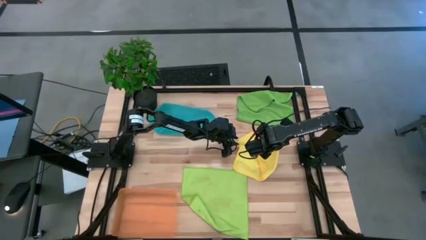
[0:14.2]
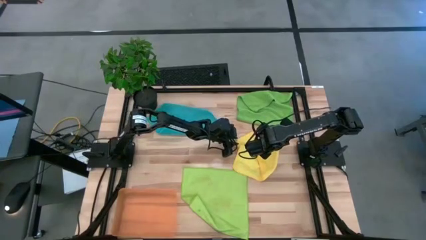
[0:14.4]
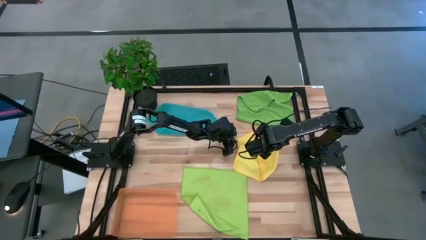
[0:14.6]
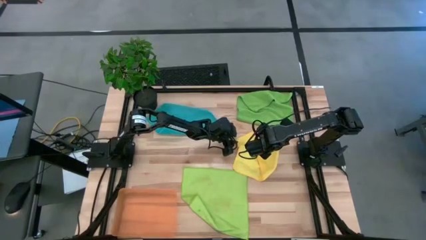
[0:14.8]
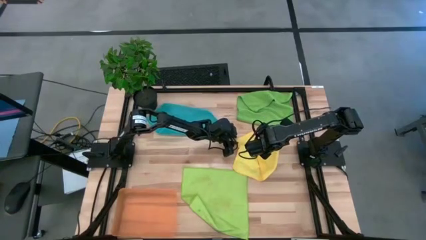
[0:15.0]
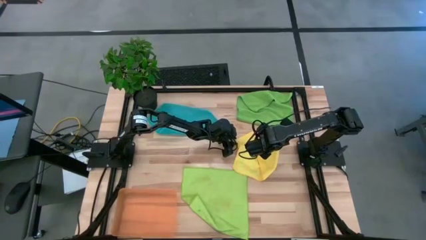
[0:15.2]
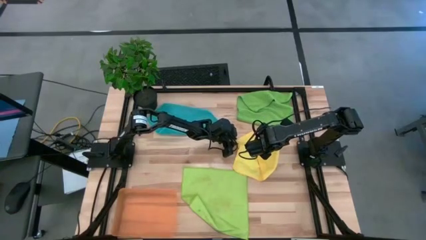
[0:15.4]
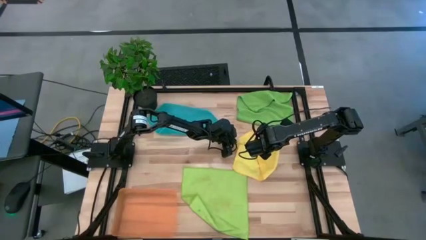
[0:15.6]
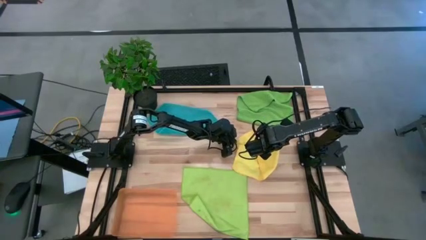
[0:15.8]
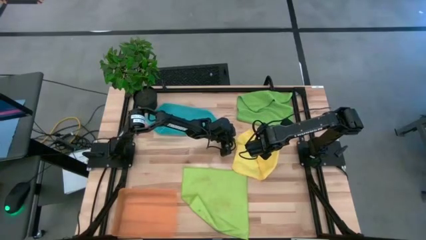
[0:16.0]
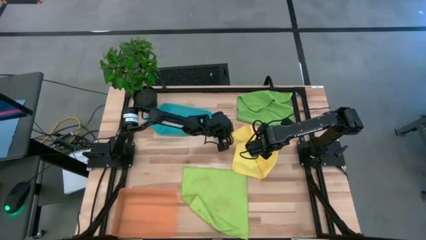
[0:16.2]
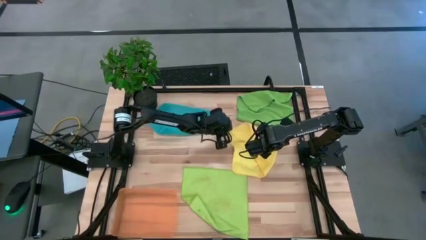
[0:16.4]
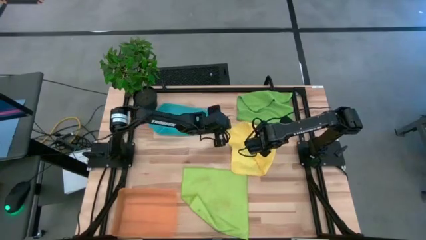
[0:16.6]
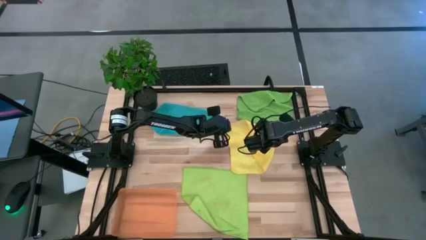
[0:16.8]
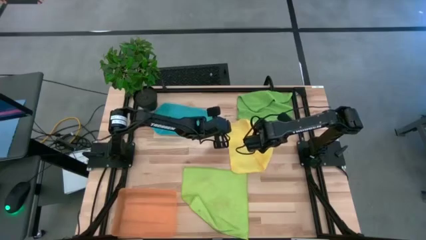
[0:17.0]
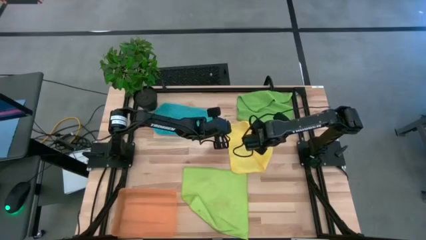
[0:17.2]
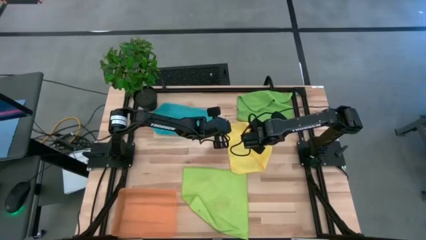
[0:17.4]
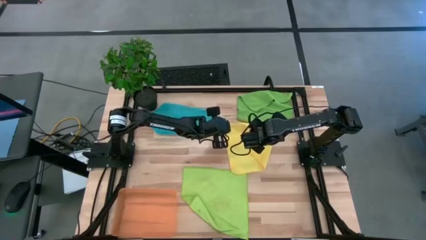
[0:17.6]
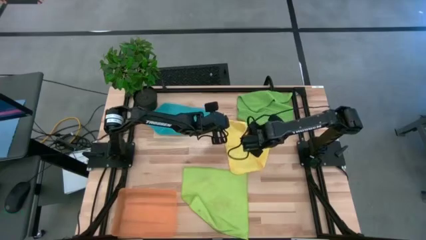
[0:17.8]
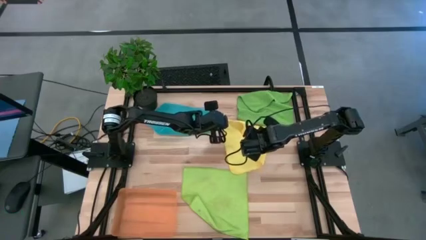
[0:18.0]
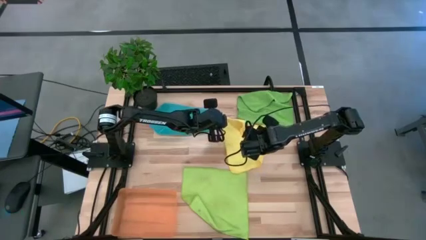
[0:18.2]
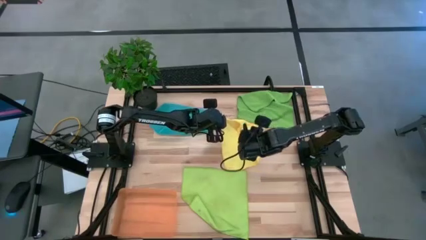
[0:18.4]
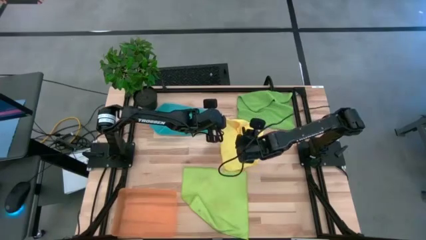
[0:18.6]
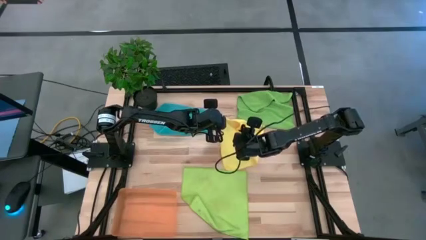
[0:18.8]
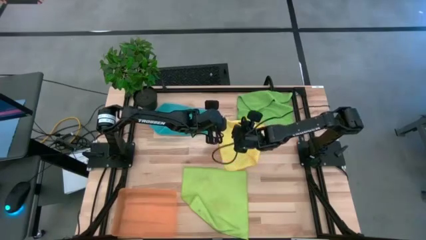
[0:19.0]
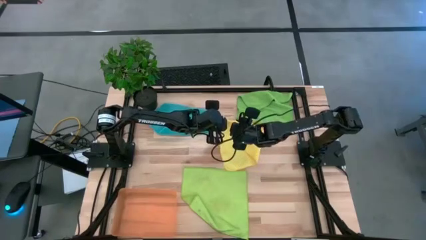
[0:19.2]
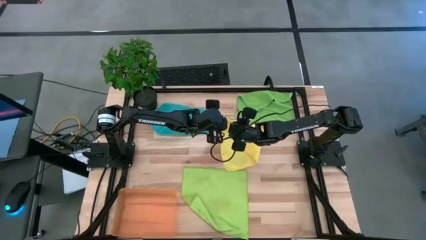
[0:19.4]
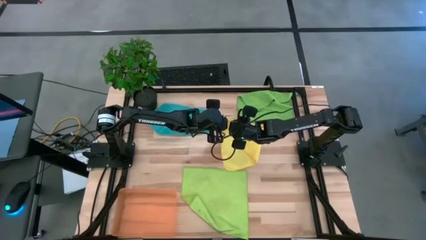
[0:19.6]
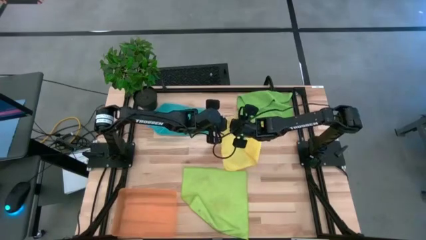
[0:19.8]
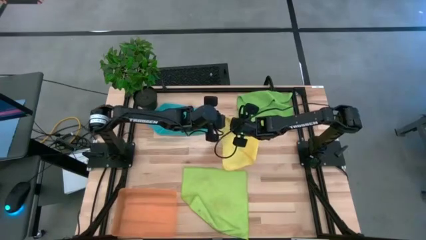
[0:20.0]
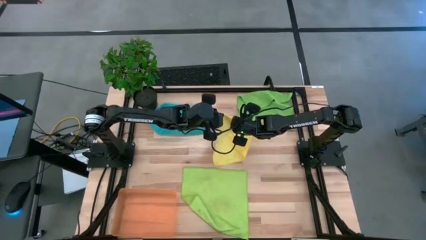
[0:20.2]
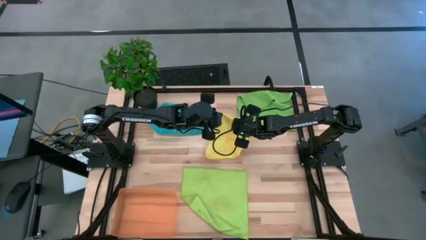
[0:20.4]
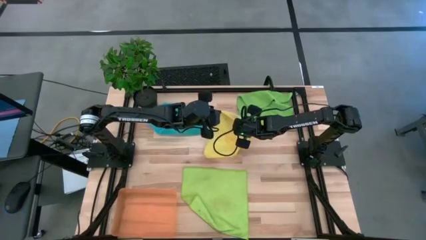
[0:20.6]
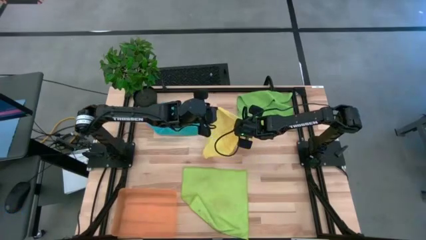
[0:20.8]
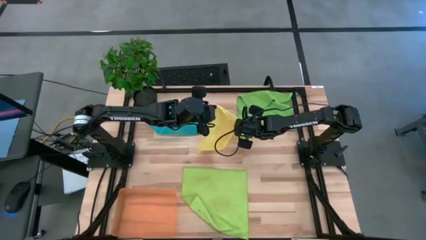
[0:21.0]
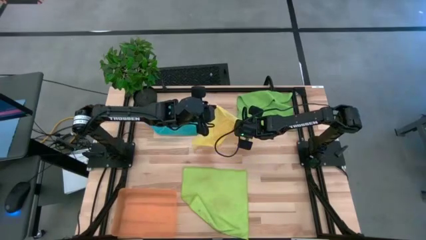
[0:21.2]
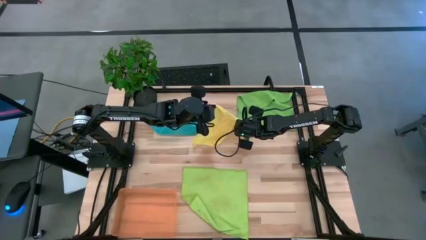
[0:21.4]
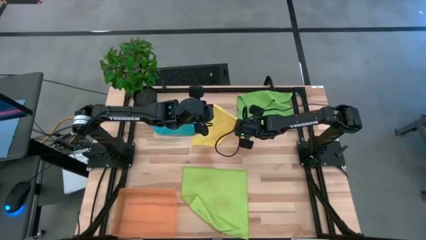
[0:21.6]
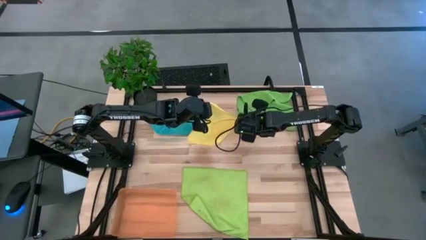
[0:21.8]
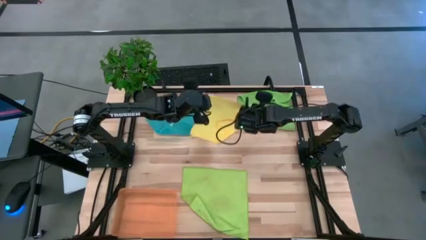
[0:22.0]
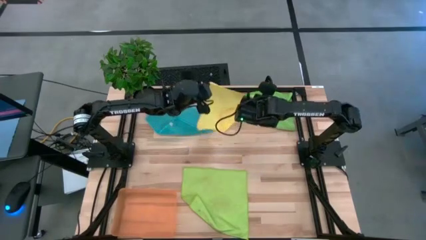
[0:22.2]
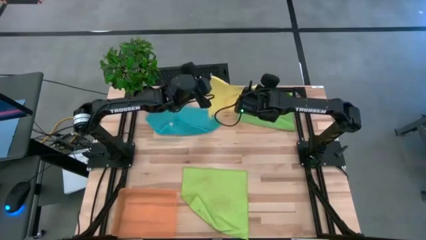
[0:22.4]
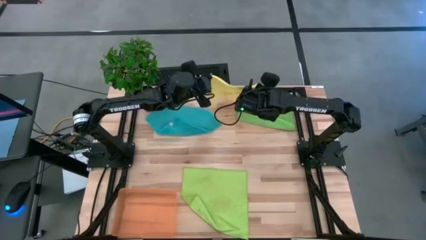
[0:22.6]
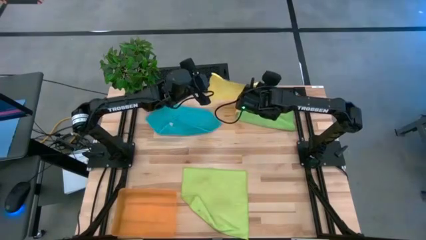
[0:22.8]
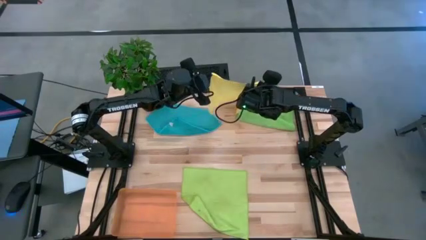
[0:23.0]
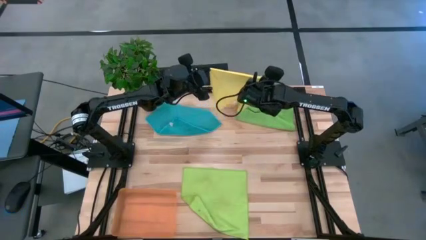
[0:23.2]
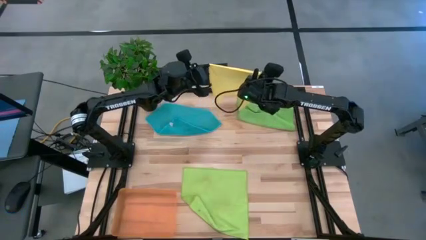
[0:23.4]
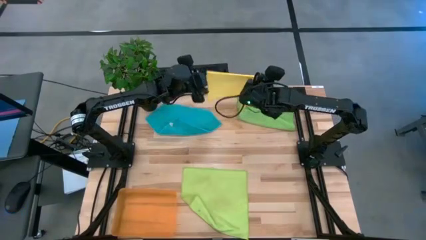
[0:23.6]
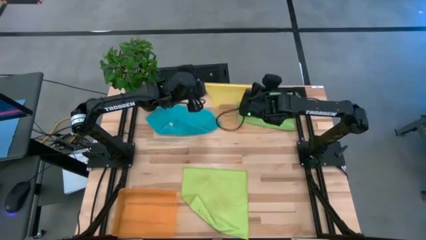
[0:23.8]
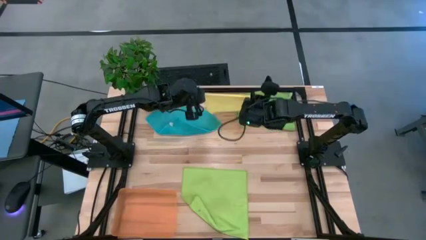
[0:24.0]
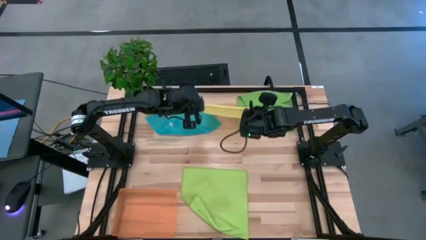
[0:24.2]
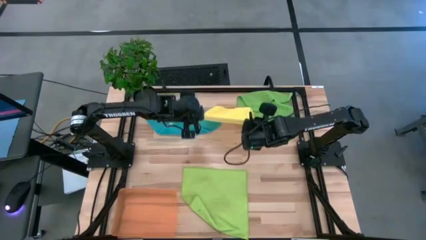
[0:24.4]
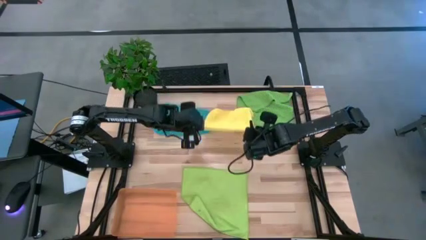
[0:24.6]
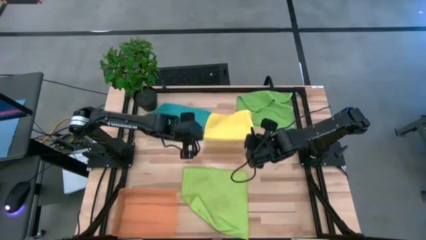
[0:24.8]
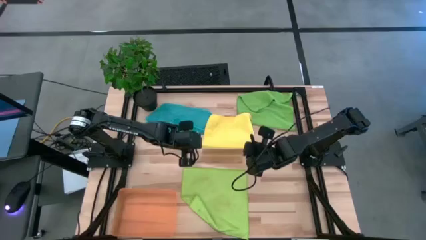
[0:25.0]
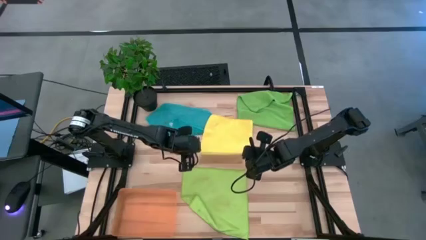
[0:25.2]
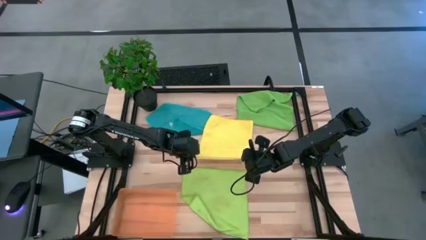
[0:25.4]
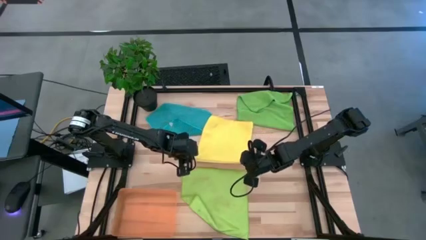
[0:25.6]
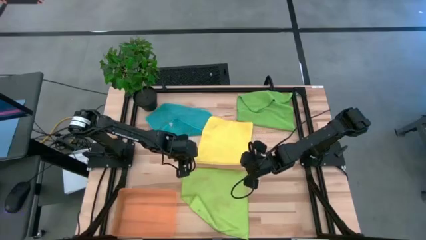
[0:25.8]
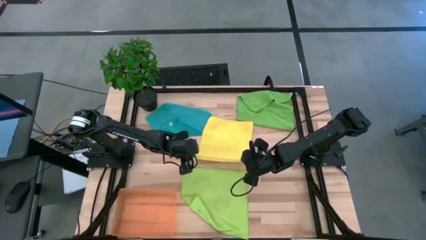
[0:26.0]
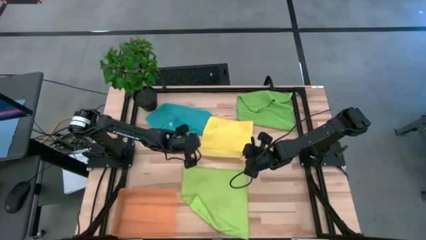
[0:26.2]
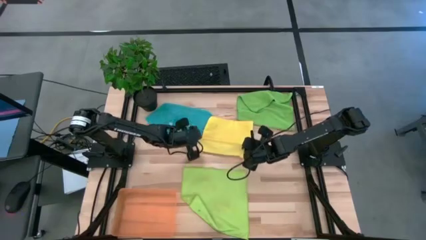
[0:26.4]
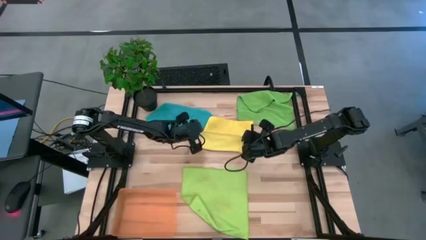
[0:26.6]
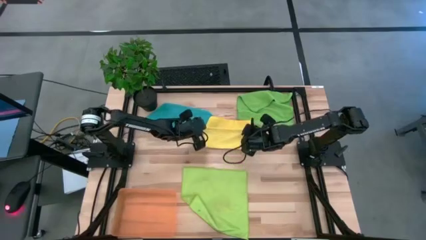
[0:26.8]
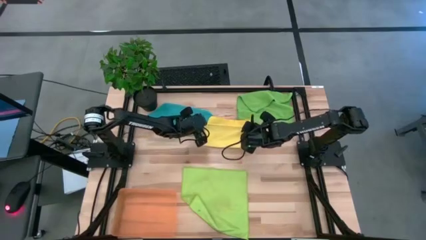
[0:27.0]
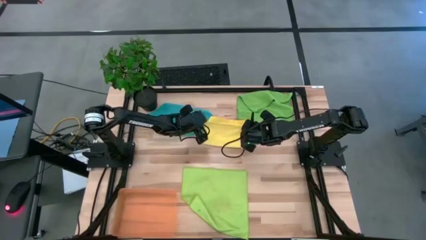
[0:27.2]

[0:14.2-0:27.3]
Task: Fold microfiber towels
Fold the yellow towel
